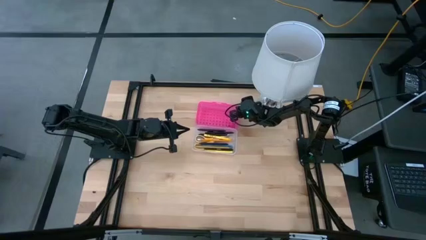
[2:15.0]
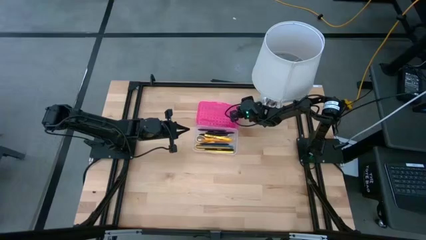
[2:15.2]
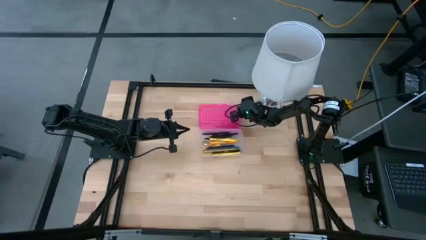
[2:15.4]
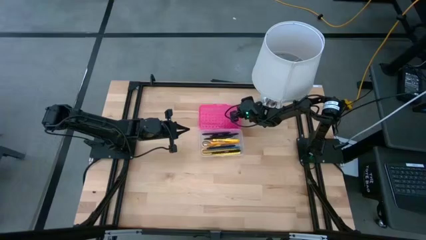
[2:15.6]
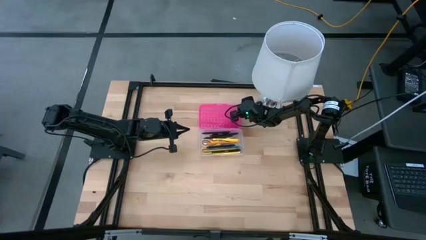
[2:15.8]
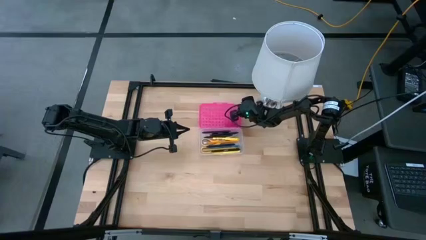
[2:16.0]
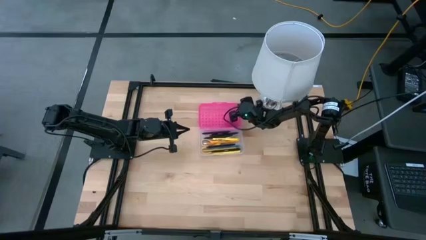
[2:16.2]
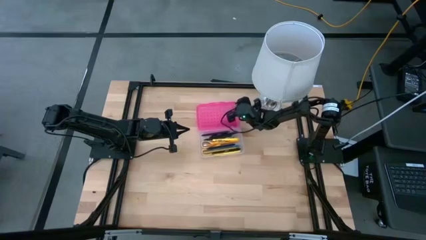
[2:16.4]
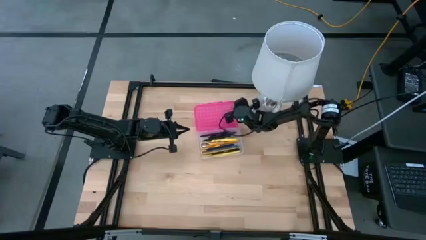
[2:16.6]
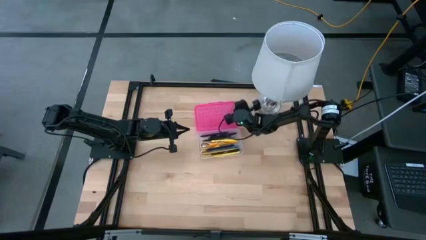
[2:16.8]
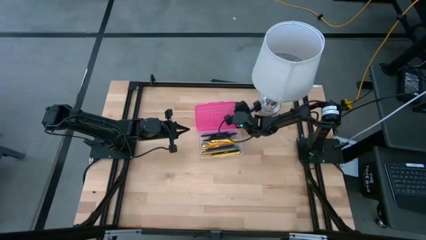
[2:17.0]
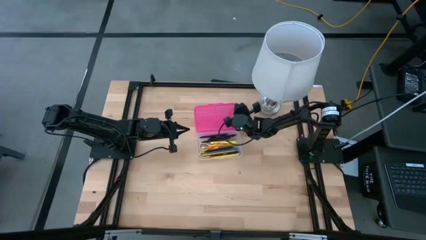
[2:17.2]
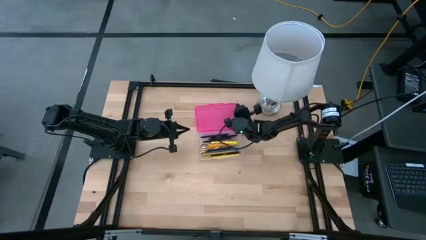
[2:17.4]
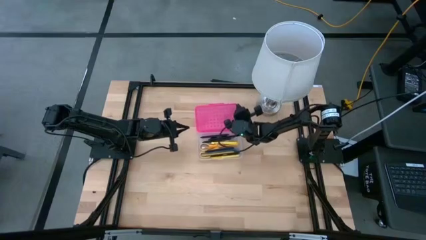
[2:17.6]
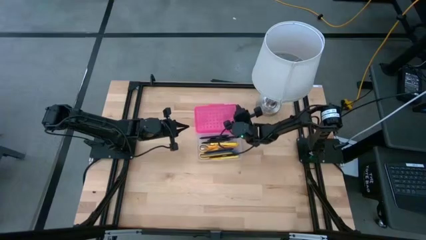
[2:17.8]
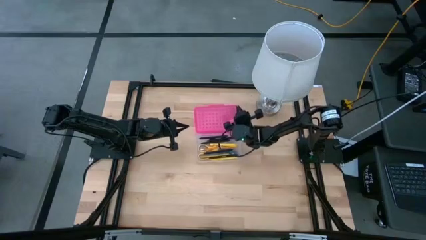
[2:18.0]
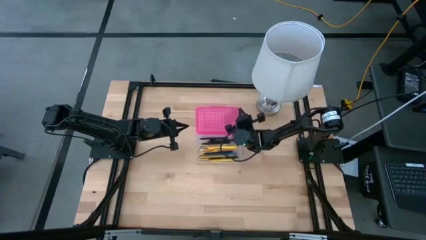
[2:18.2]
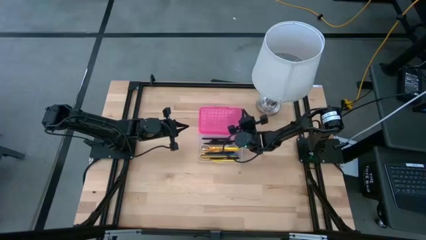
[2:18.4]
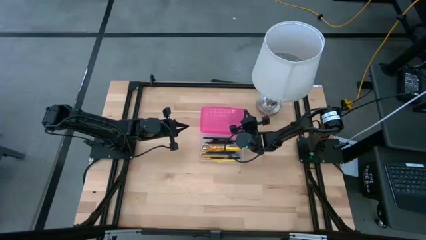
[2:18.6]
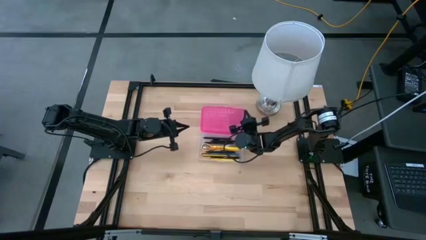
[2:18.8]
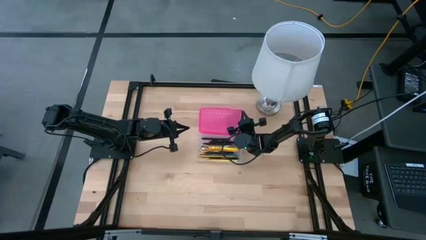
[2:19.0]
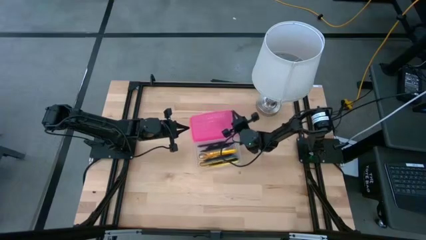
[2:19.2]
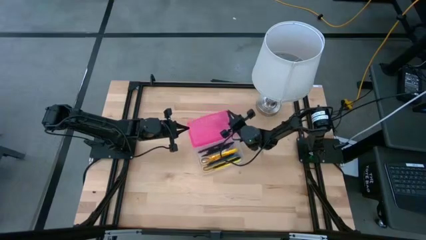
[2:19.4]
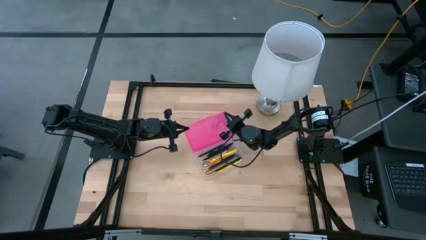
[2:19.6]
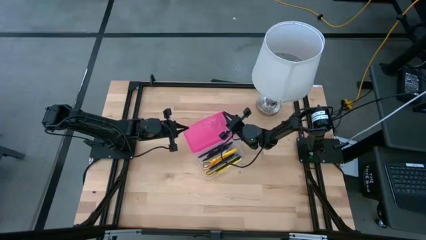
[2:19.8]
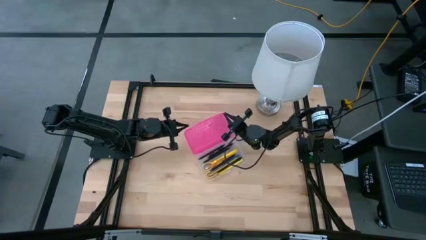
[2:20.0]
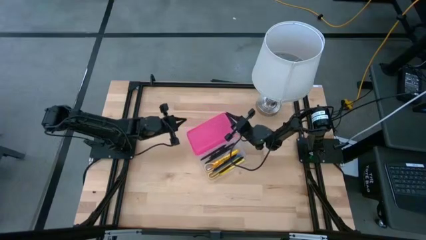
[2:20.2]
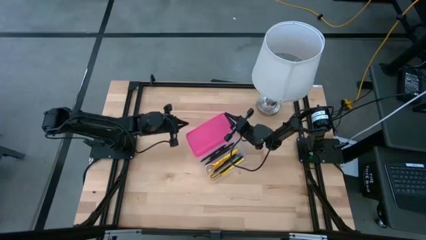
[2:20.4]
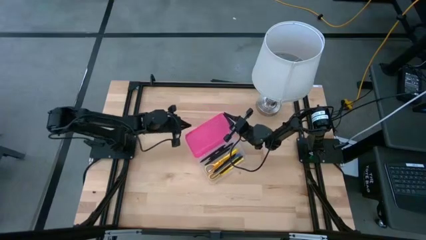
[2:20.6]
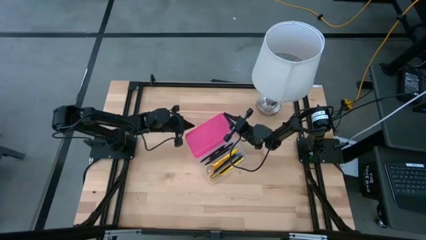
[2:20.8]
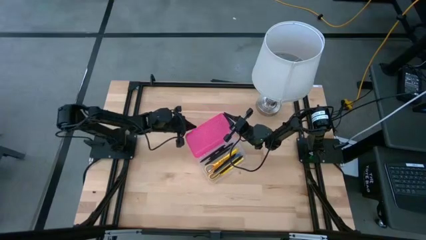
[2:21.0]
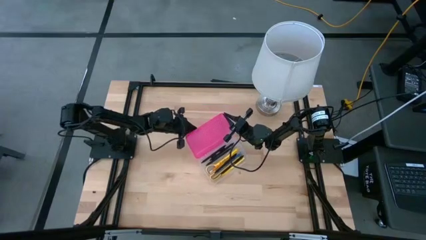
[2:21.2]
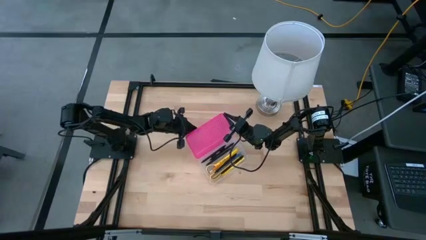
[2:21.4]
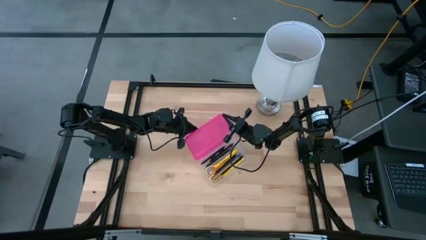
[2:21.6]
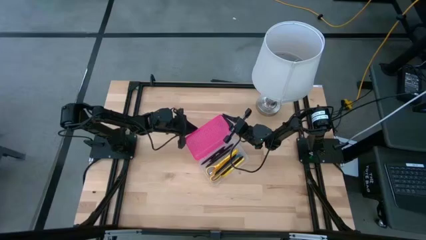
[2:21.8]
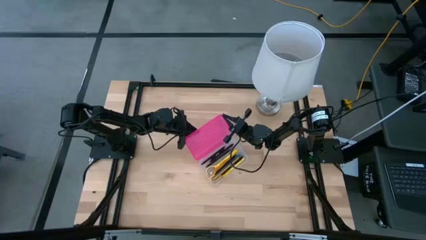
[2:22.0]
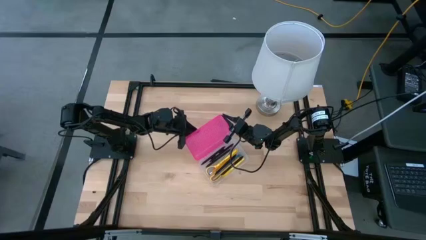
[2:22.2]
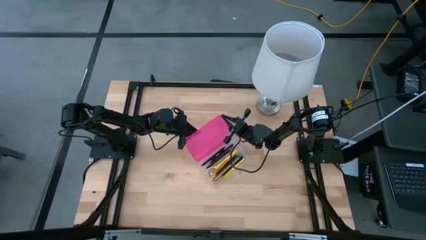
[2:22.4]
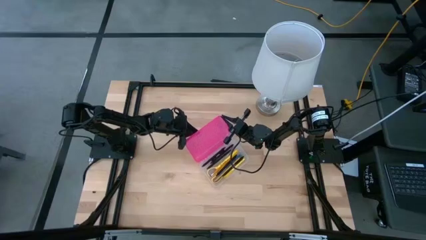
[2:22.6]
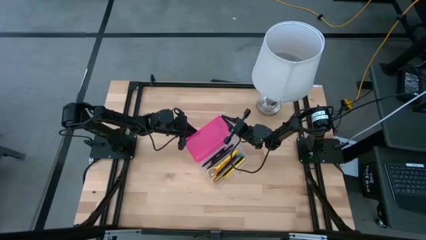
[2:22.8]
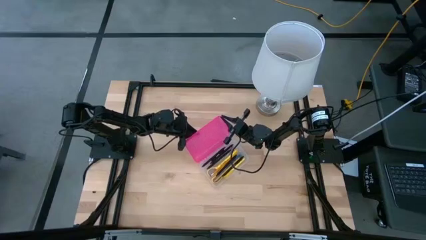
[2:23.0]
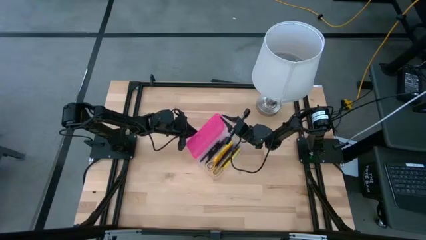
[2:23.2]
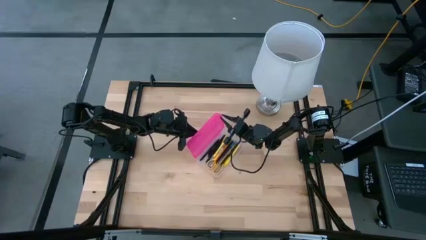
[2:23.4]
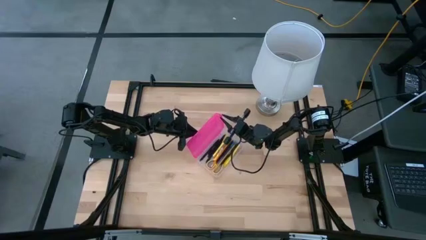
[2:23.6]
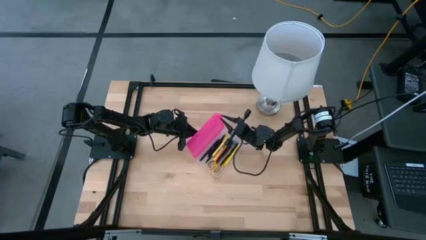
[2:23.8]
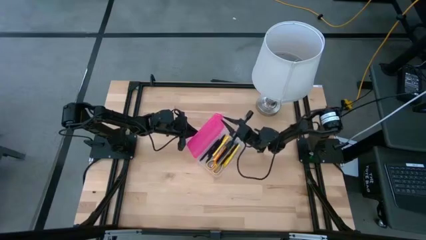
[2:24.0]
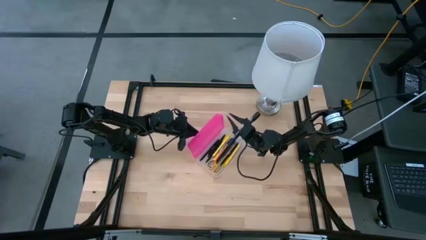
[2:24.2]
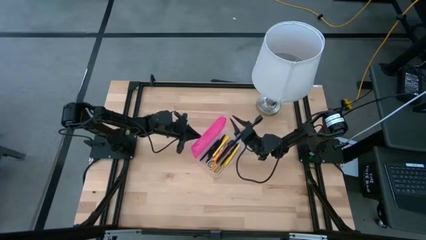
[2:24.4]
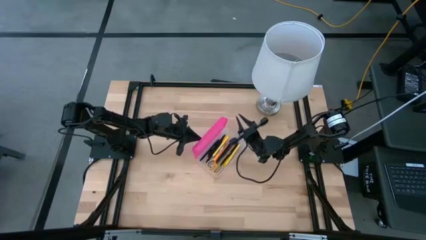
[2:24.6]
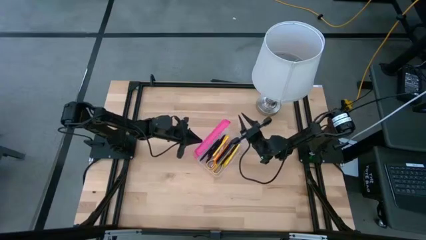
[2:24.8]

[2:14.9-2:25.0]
Task: Pick & place school supplies into a supply box
Close the pink supply box

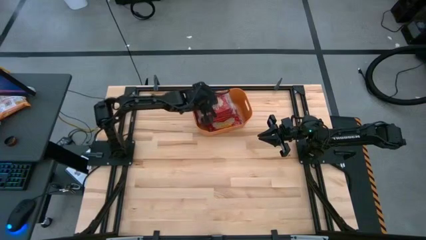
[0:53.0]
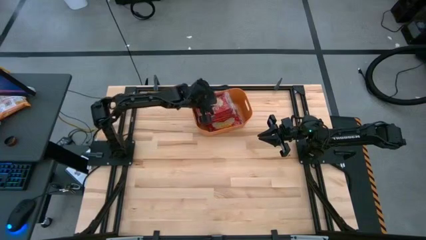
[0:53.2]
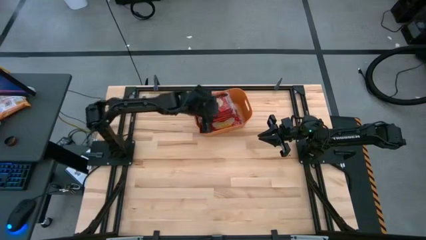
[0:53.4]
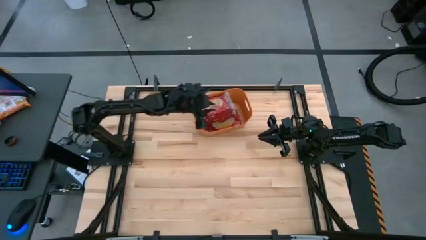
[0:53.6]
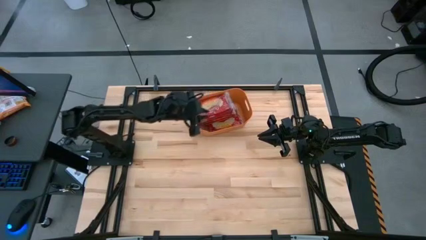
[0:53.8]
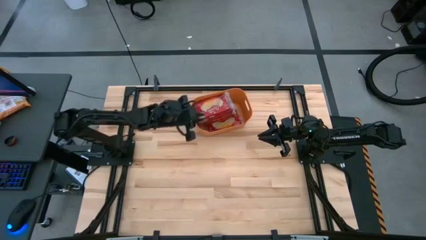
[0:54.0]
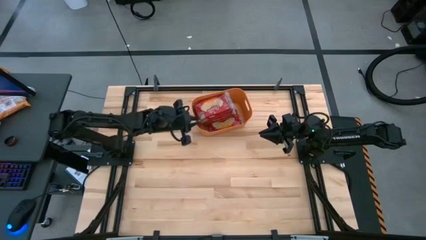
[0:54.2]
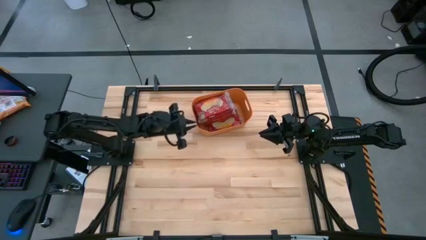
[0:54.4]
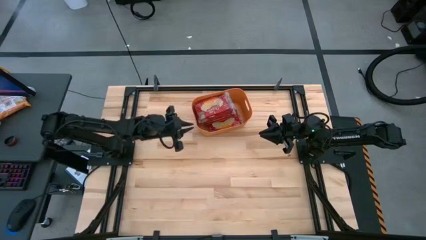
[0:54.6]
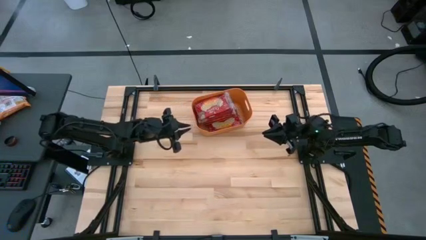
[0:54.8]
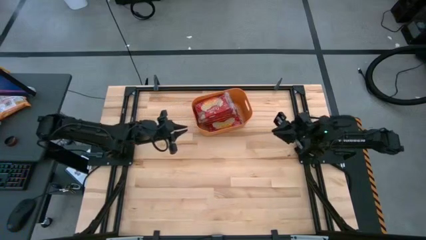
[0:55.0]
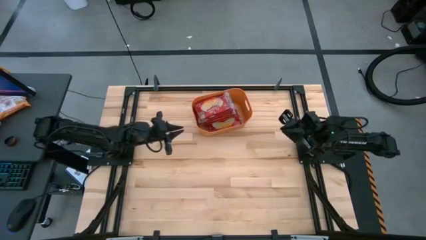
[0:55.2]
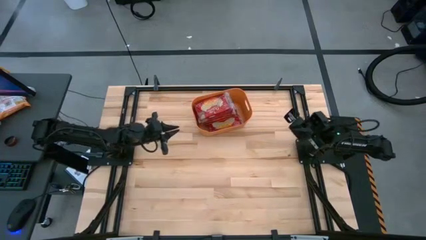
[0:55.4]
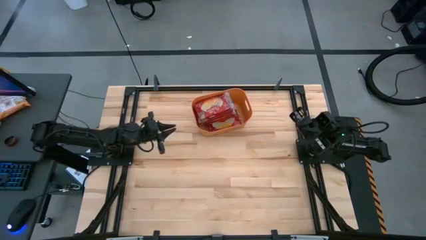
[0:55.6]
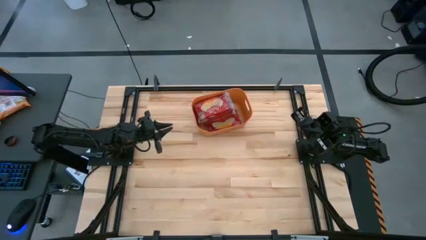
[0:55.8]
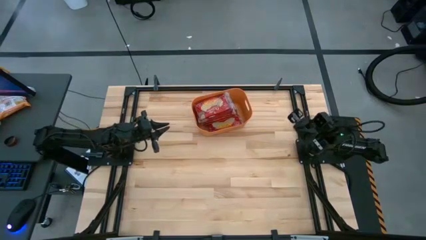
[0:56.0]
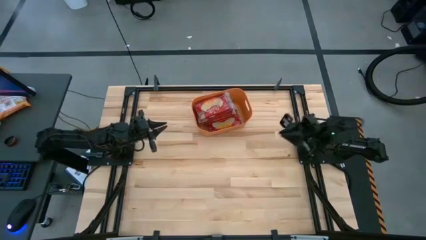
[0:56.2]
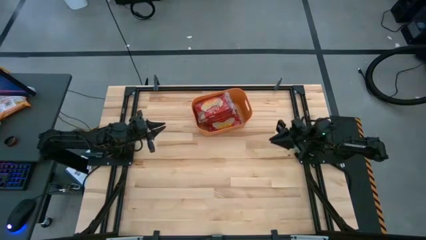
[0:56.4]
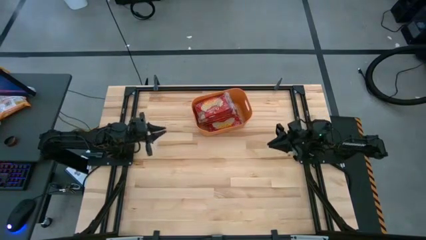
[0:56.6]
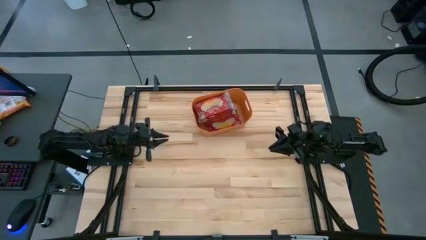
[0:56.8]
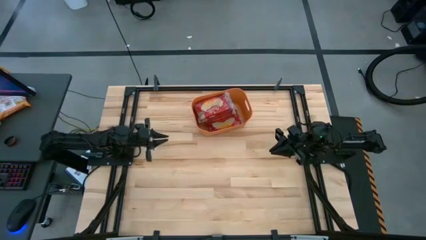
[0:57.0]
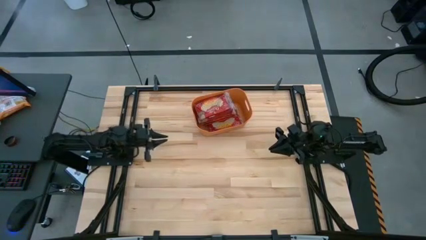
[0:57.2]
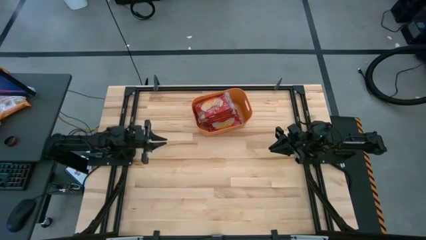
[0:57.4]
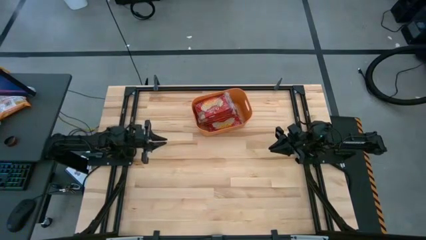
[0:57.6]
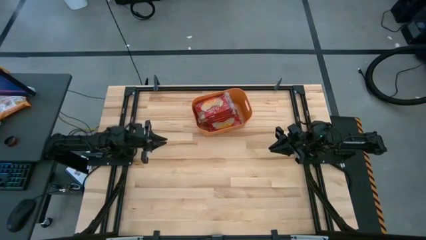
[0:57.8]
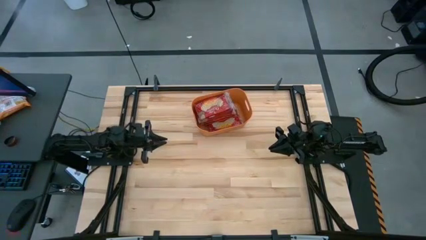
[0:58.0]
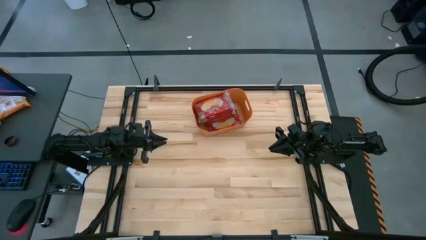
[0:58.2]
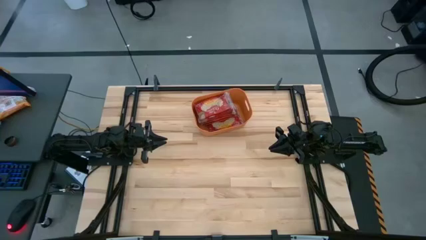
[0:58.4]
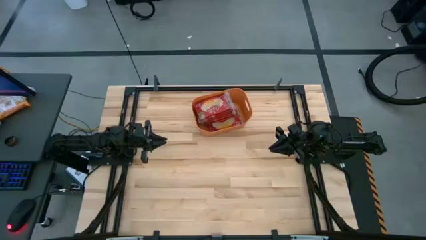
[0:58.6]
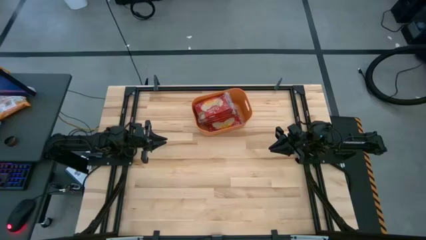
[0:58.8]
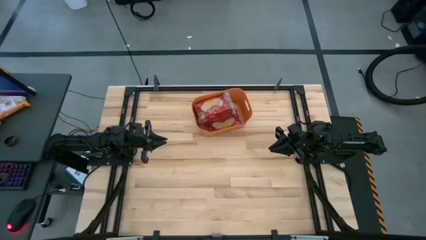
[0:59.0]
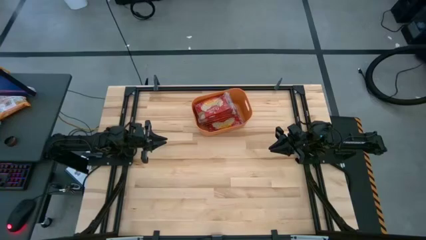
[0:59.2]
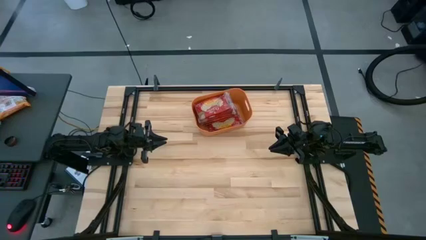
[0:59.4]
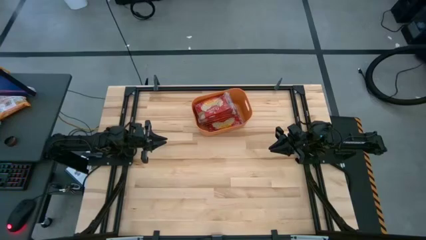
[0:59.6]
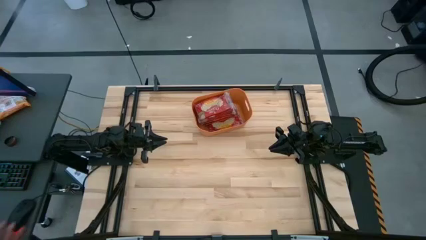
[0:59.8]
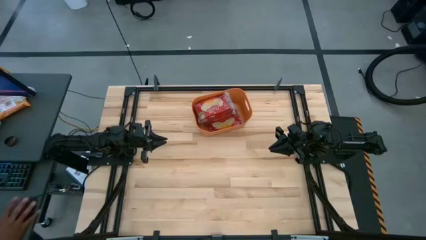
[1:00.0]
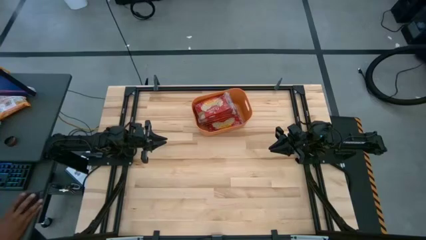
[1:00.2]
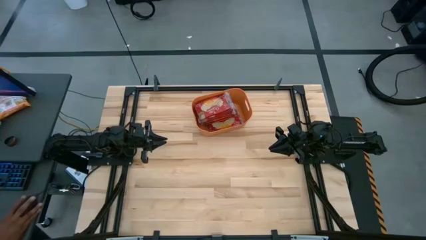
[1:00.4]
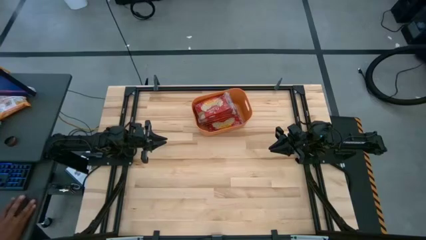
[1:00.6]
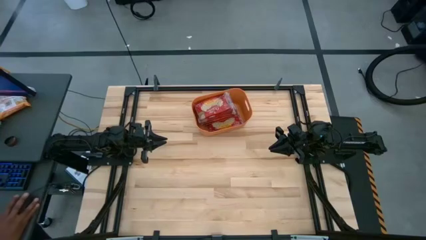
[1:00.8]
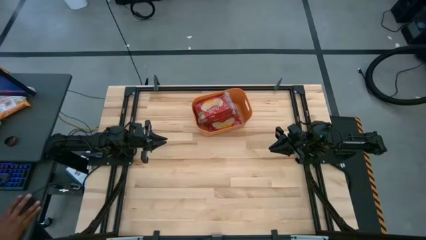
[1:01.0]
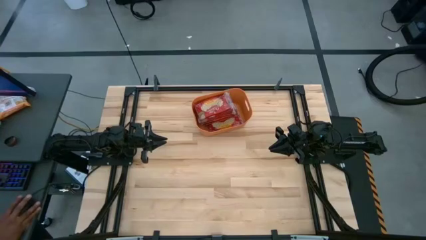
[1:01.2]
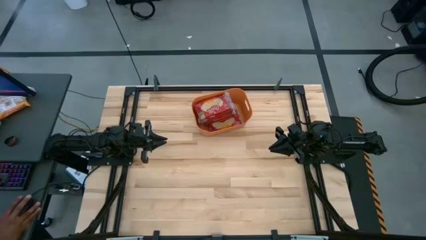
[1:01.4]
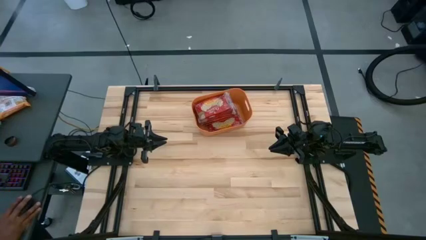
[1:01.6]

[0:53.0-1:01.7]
Task: Sort popcorn bags into baskets
Return to Home Position
